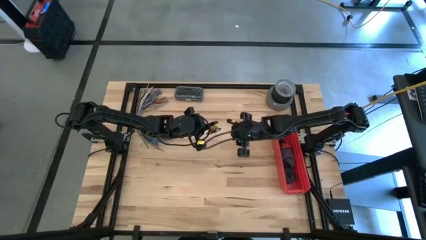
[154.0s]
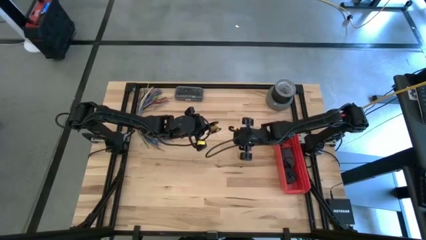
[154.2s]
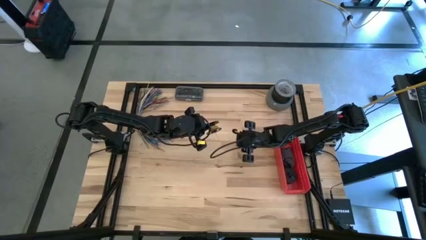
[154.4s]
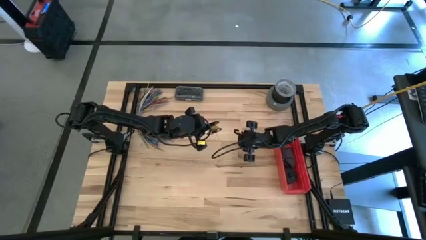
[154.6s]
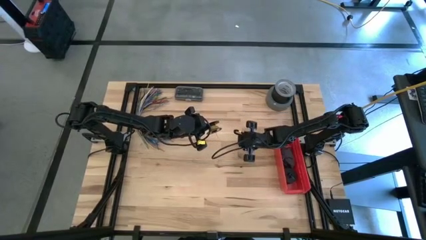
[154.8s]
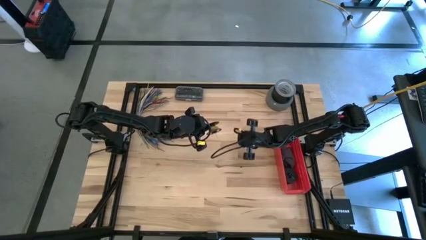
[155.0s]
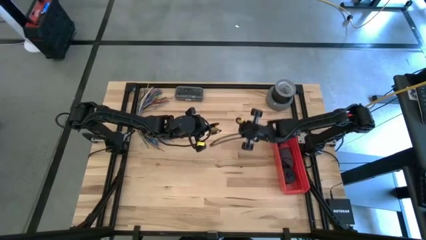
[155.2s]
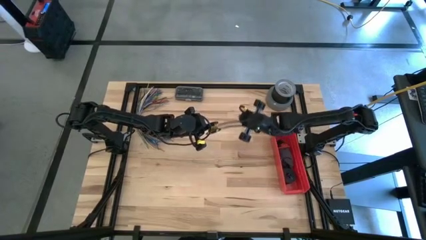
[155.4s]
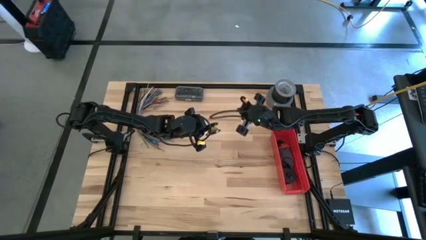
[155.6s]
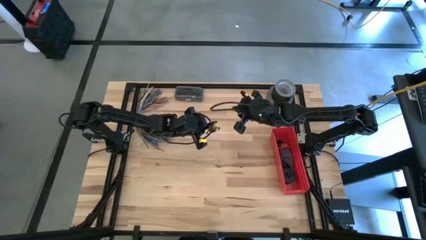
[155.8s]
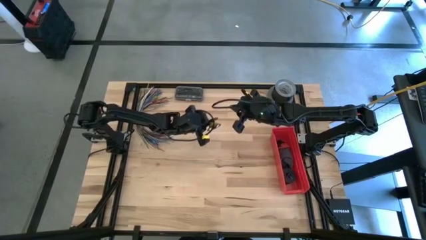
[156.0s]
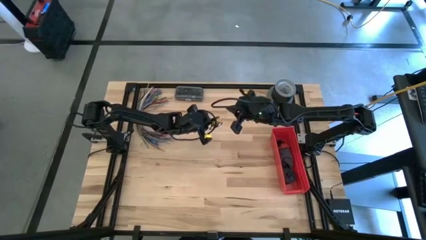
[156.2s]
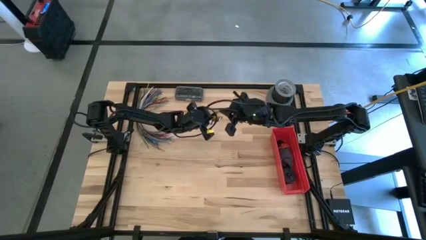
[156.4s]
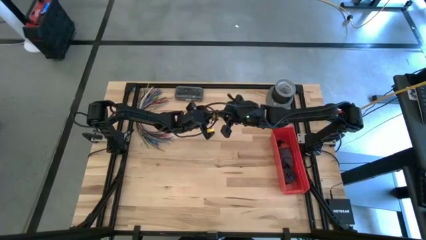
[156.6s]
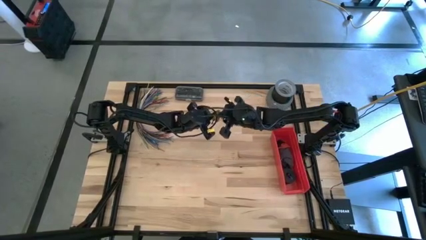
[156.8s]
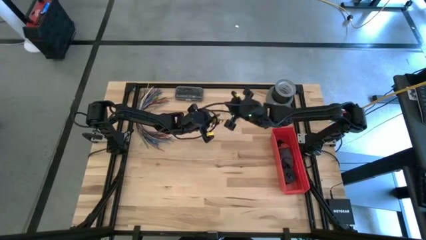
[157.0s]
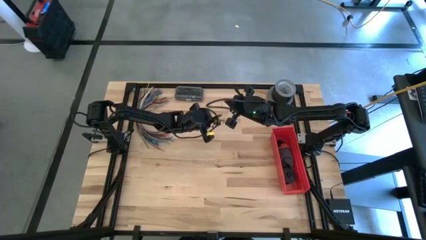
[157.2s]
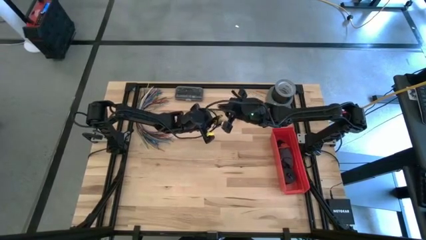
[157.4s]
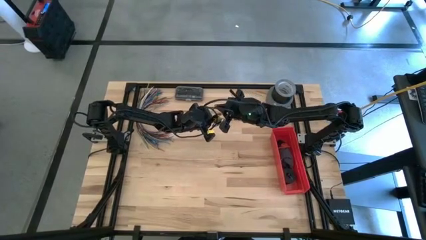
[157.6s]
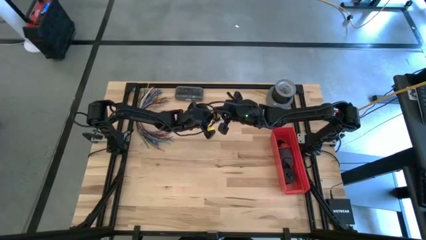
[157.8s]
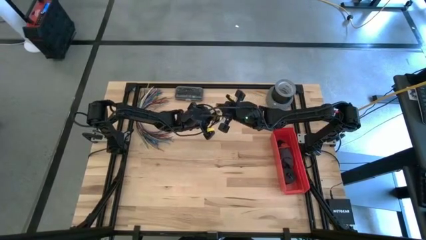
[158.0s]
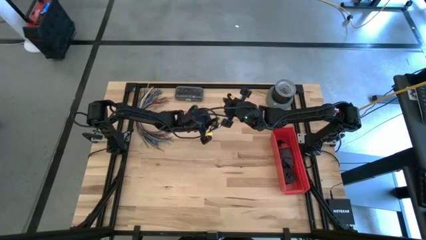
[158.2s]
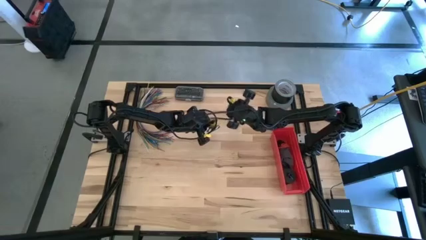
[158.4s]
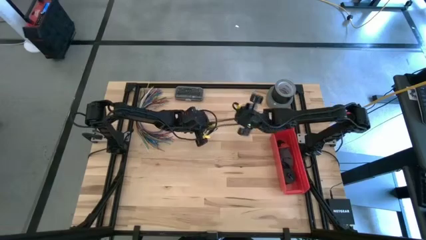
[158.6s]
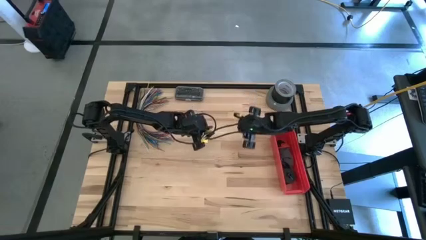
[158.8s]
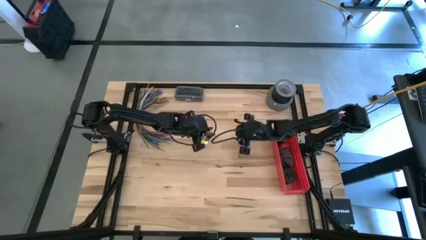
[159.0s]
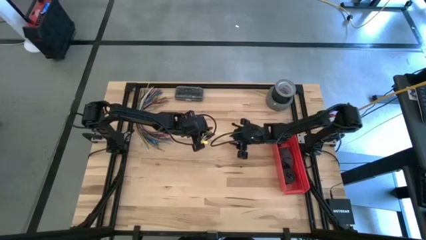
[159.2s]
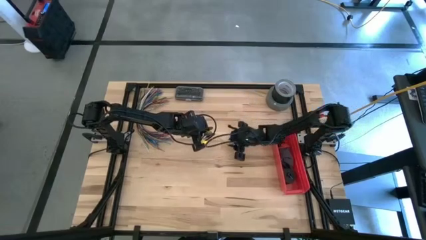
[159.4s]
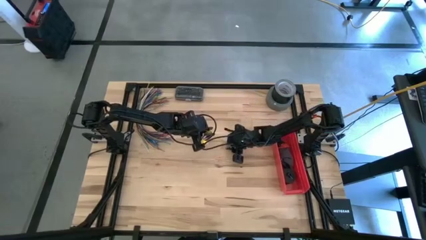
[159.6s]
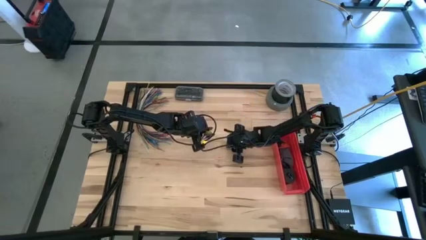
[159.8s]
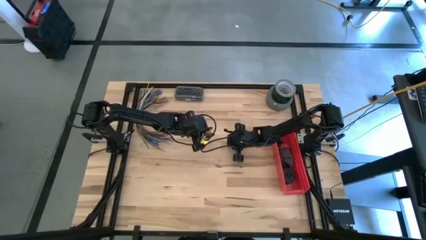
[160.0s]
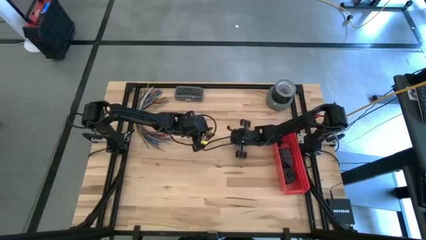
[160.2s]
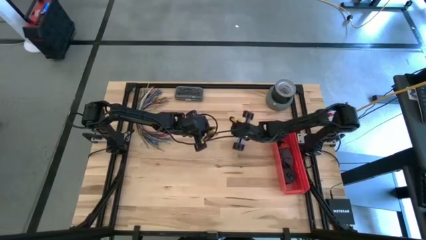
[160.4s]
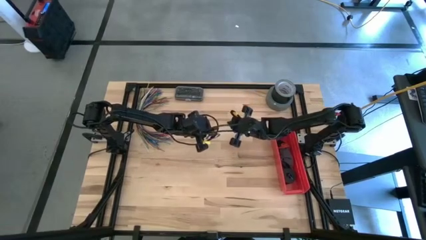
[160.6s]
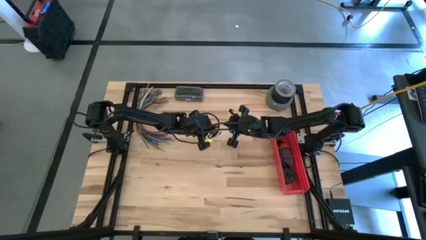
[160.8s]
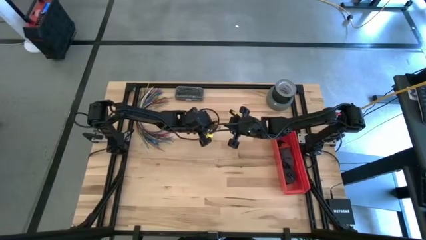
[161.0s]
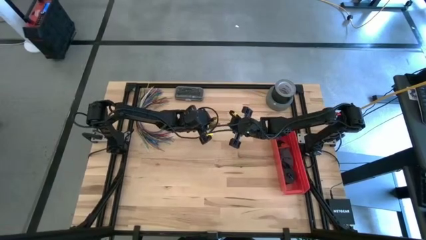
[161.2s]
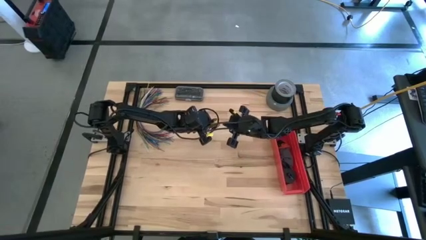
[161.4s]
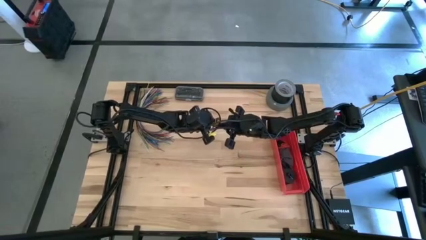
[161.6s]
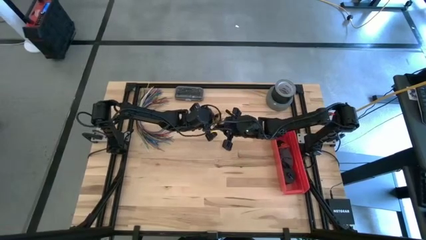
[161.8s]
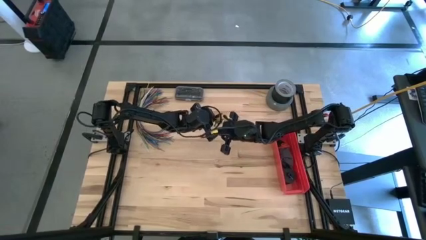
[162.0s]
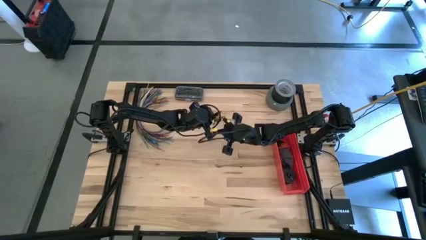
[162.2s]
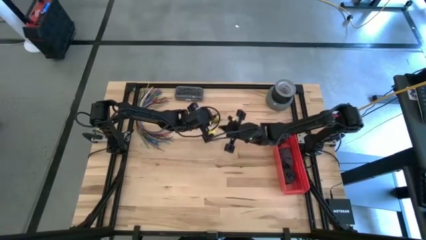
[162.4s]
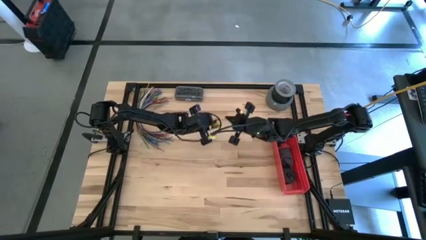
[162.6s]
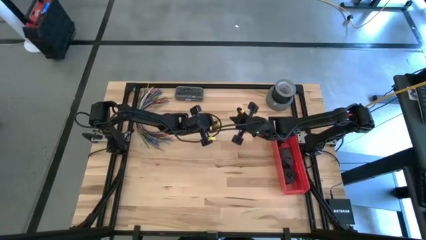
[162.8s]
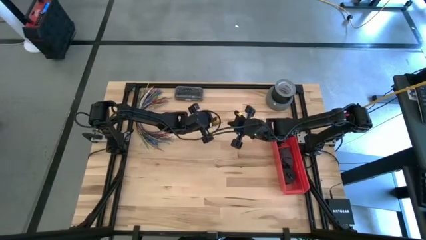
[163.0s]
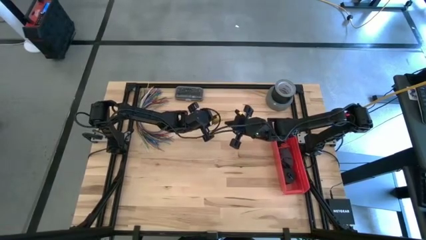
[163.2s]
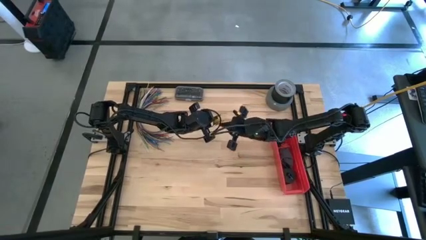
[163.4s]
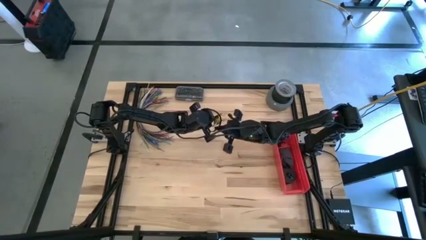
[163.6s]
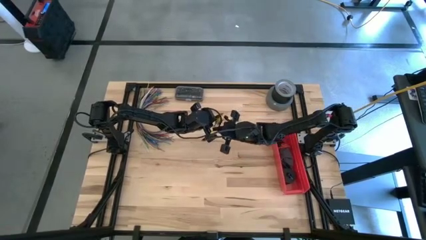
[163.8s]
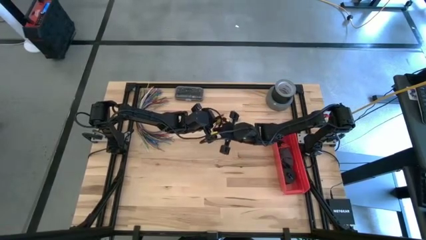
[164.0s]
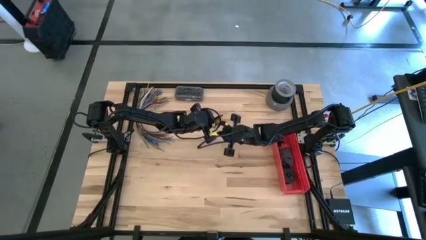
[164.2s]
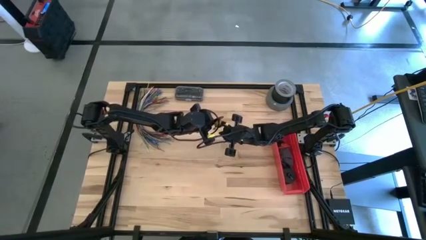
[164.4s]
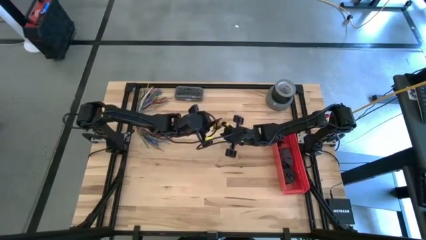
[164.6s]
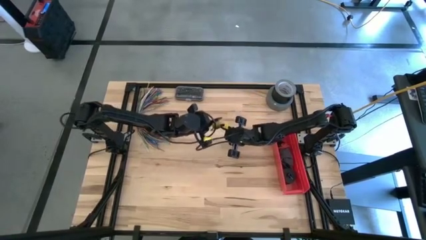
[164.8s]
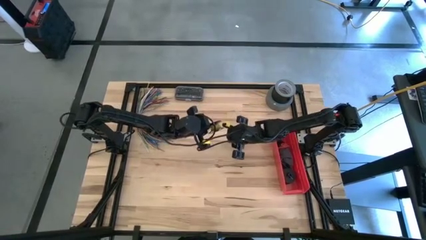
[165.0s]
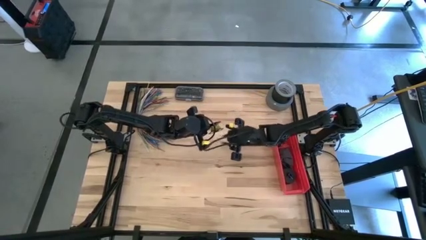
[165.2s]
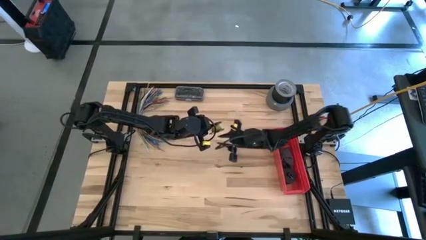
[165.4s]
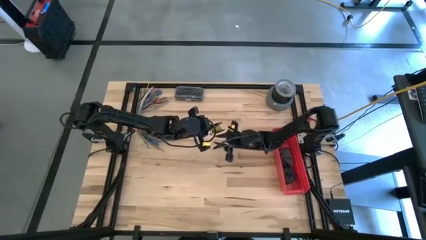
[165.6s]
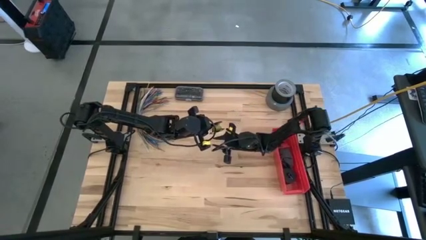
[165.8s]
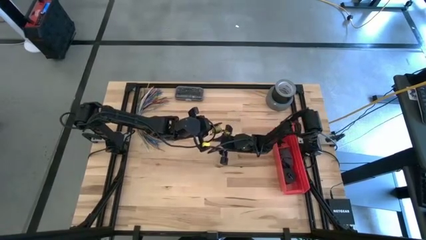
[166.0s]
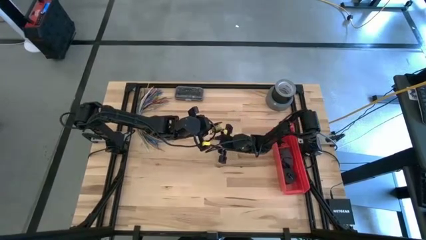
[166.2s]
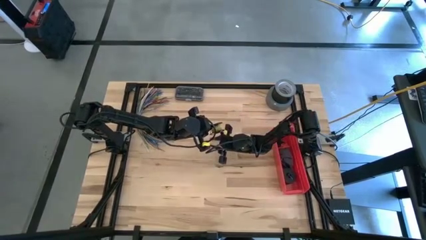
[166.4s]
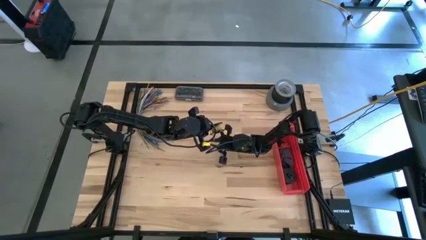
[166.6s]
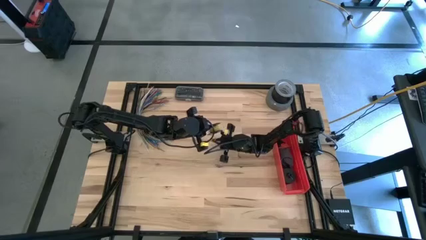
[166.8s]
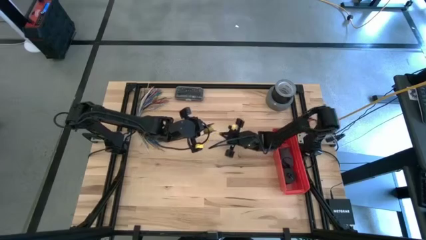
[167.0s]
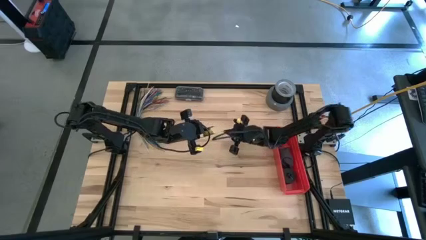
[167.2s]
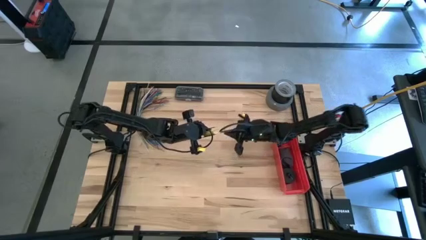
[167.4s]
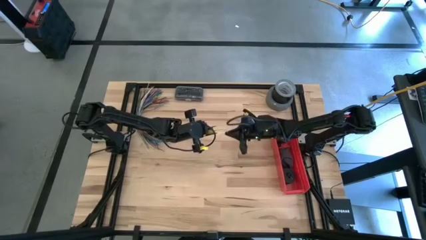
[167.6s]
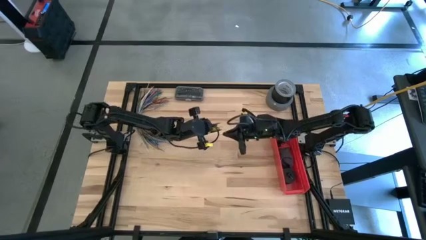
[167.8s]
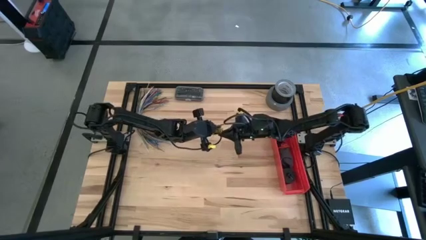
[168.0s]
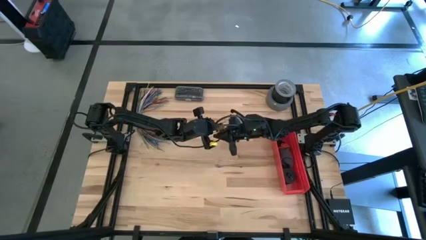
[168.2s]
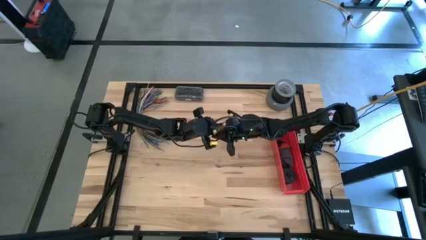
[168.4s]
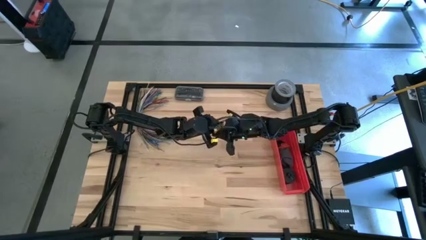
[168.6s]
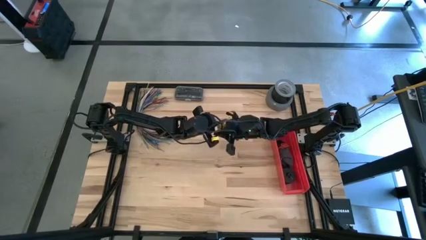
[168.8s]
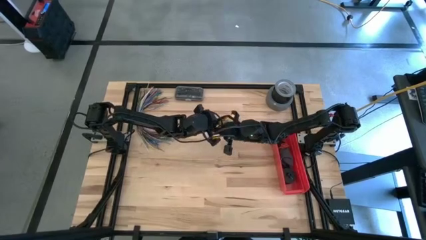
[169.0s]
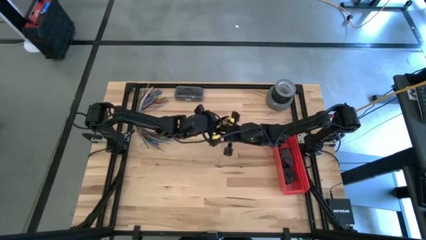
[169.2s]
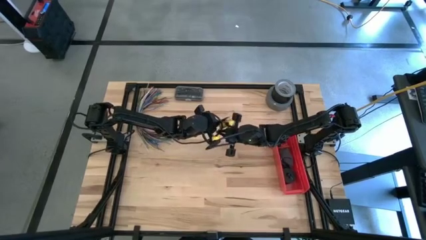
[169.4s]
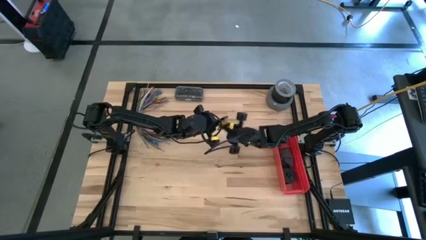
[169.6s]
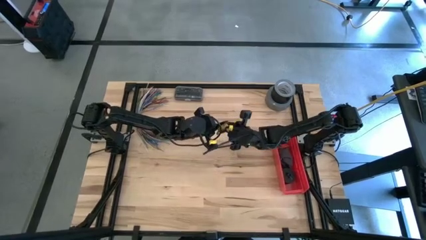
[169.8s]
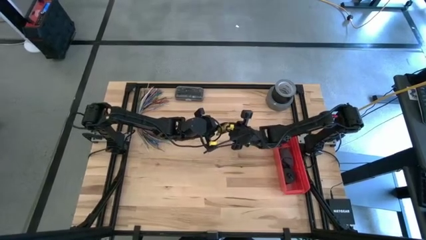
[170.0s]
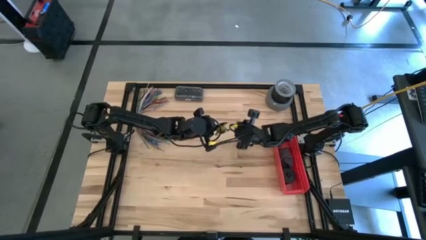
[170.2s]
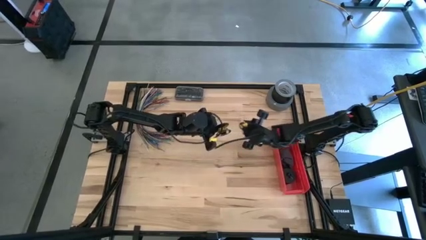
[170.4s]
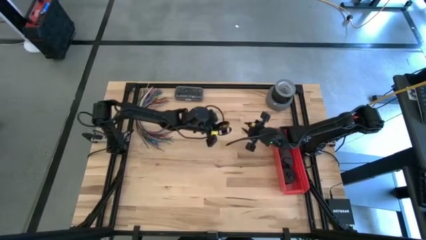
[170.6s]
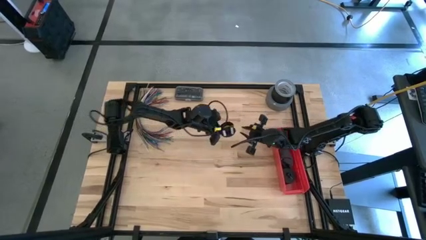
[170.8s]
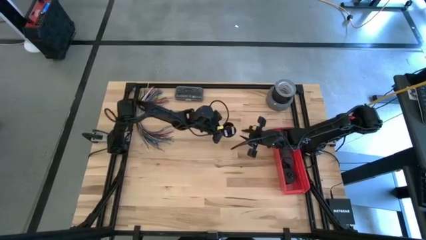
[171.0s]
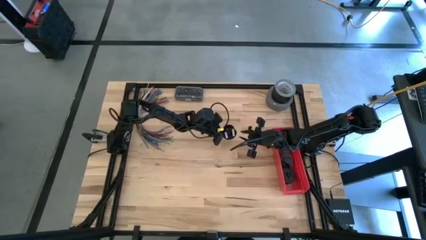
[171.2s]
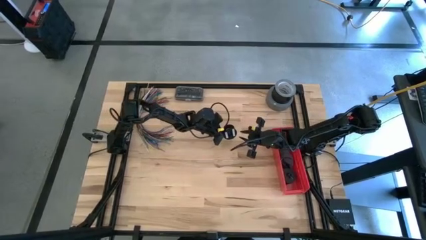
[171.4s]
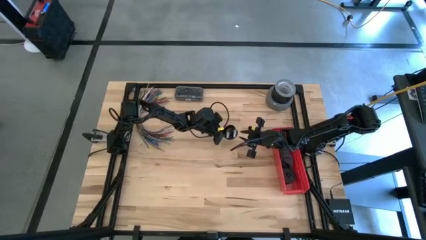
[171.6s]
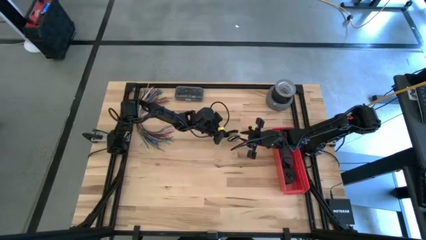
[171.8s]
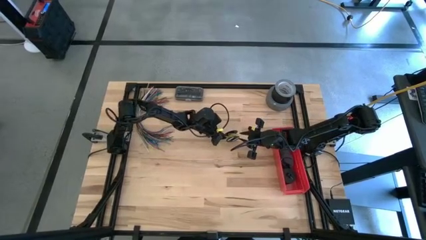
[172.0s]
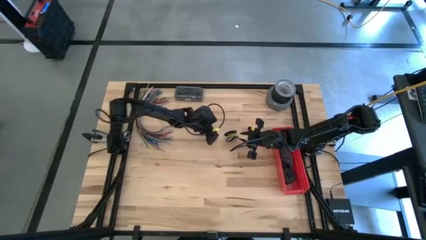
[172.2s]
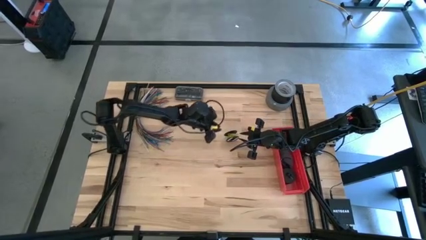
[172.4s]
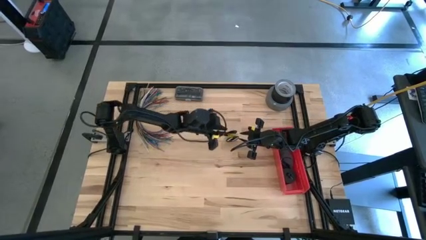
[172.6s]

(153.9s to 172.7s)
Task: Coil cords
Coil the yellow wire onto the black spool
